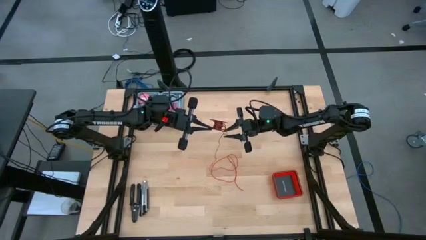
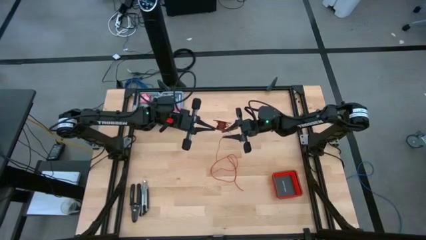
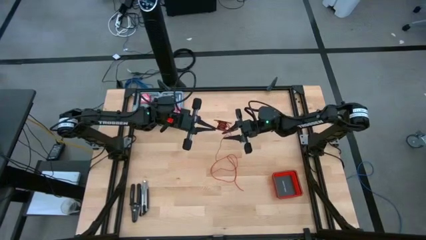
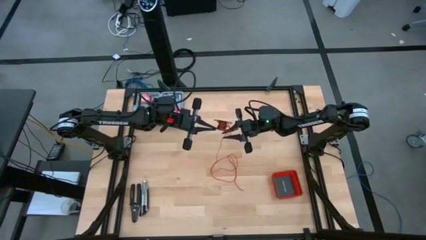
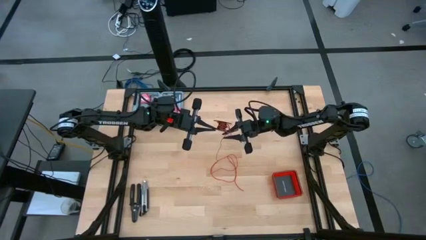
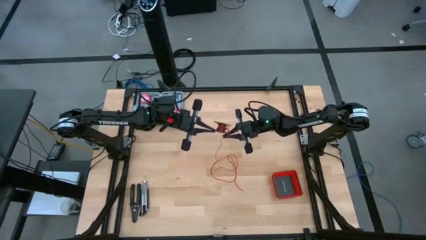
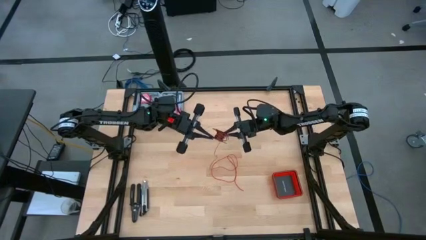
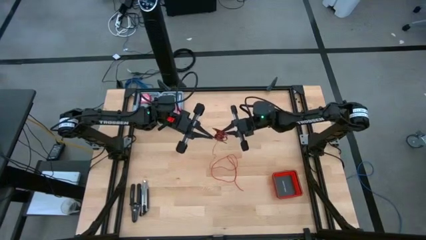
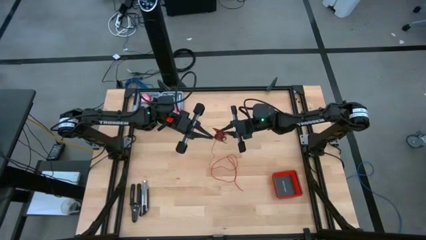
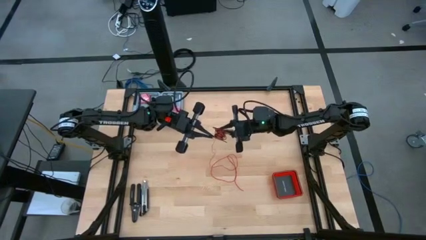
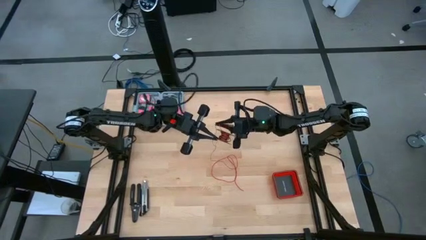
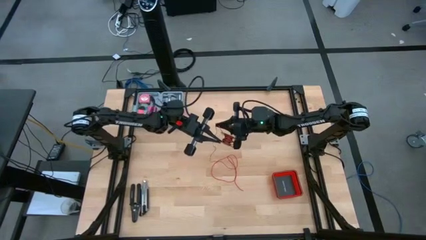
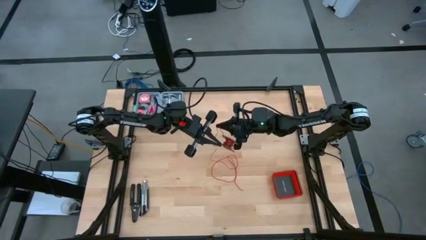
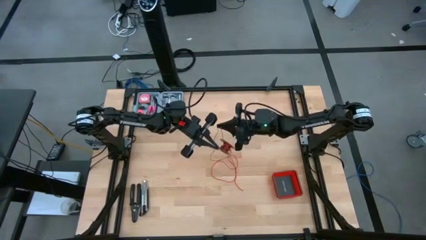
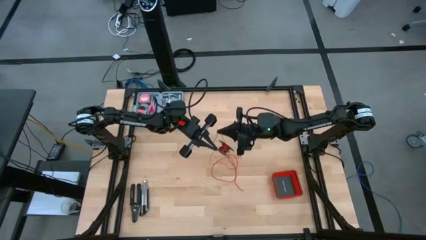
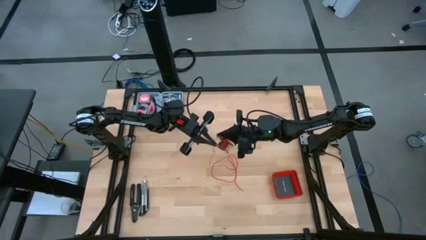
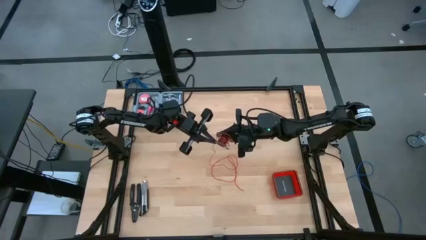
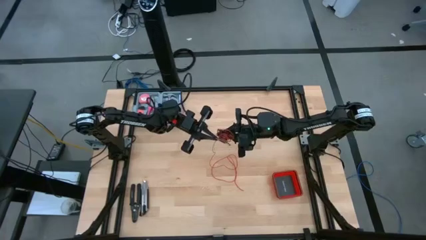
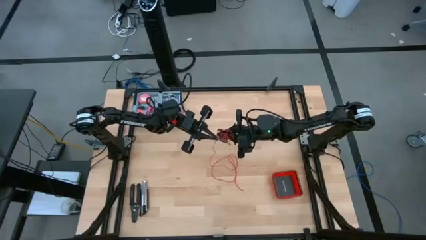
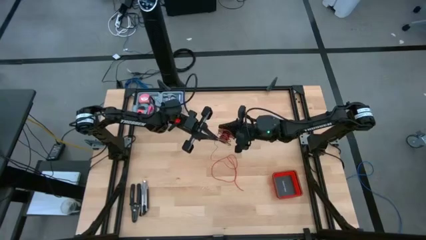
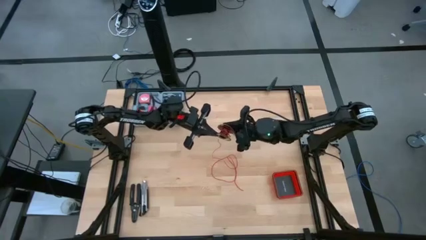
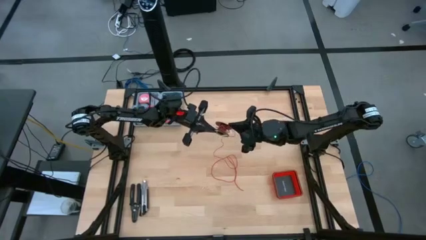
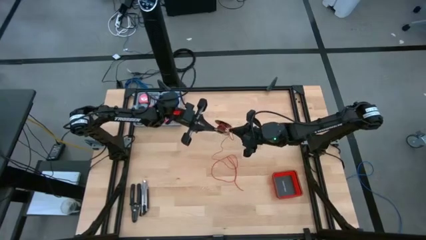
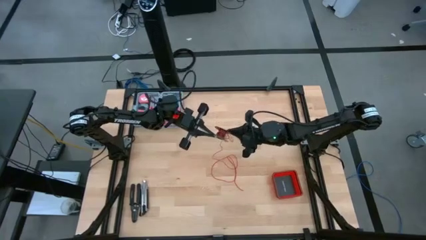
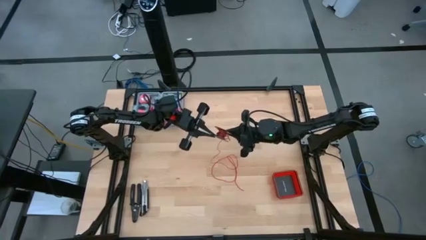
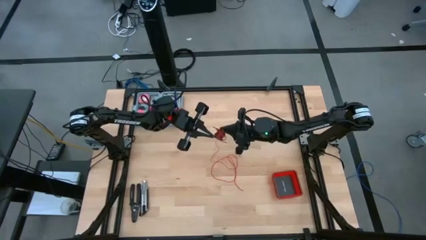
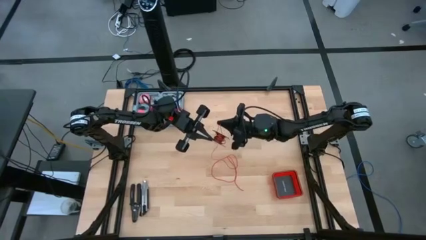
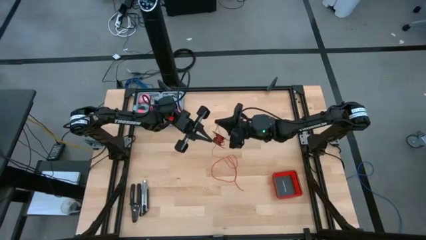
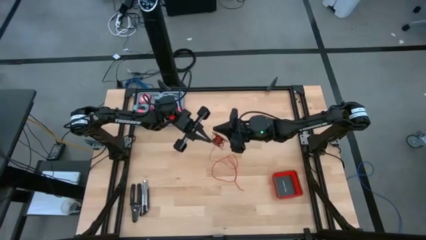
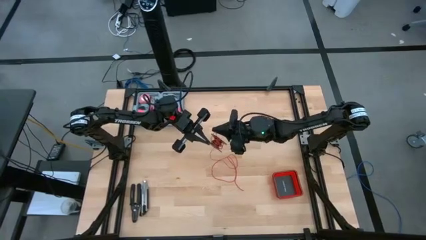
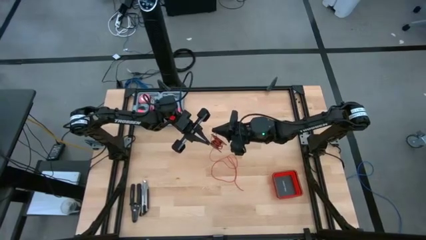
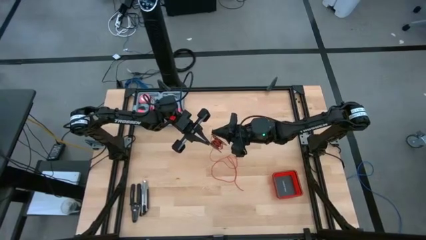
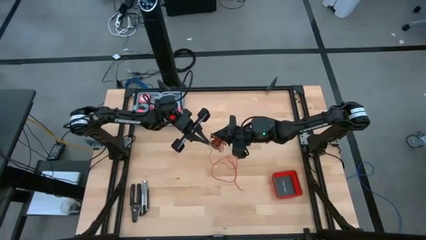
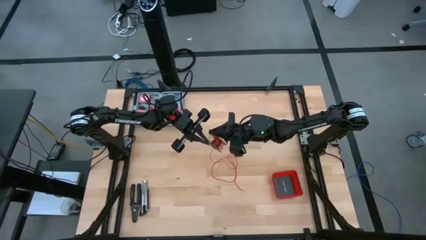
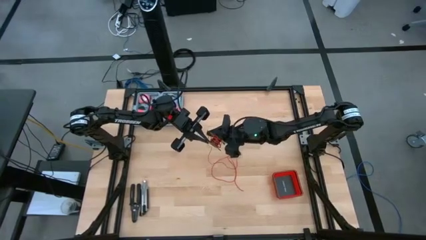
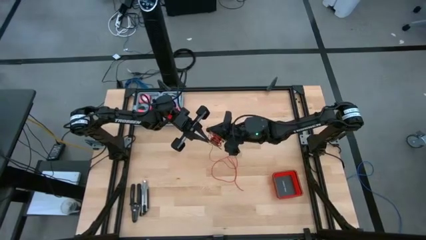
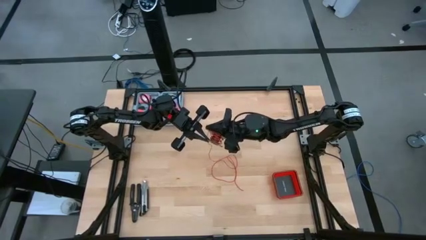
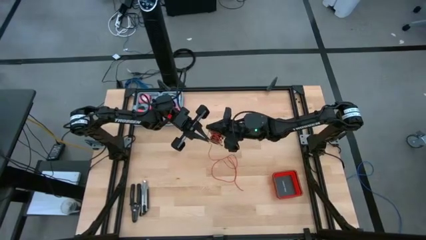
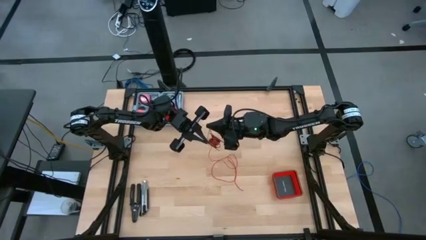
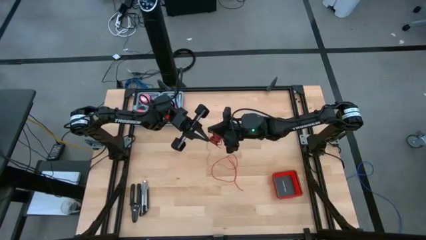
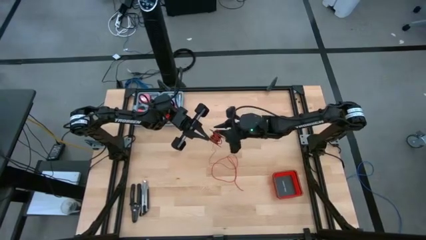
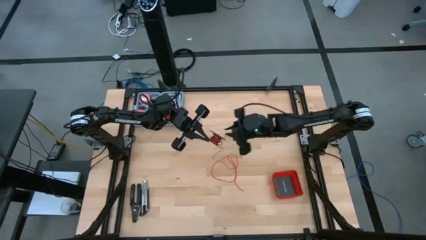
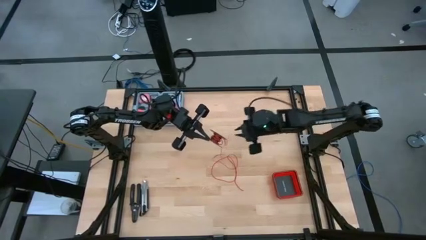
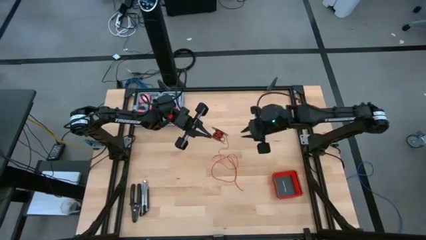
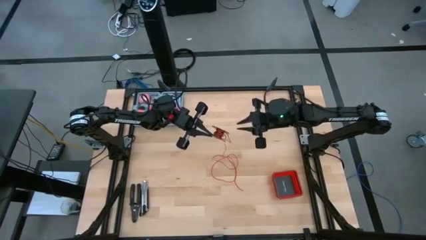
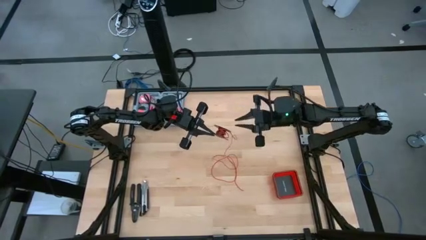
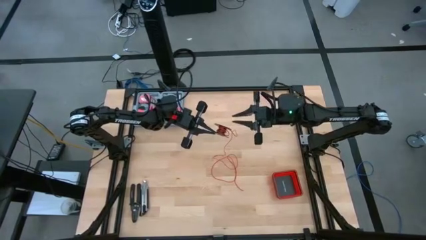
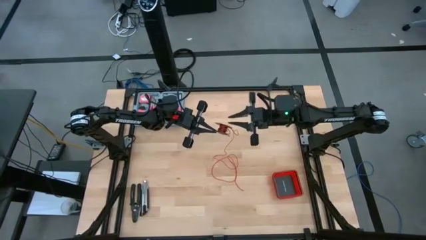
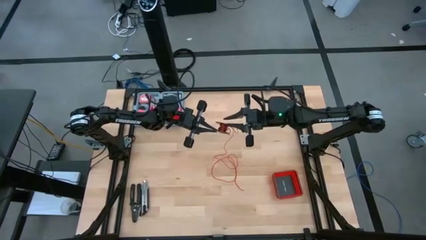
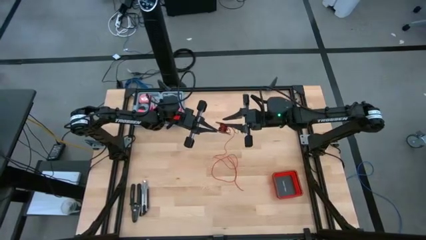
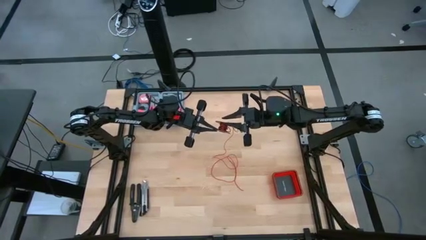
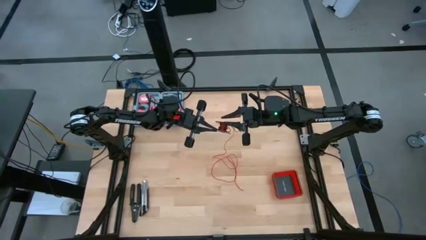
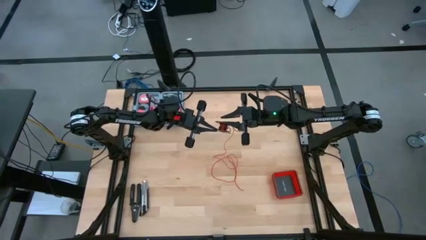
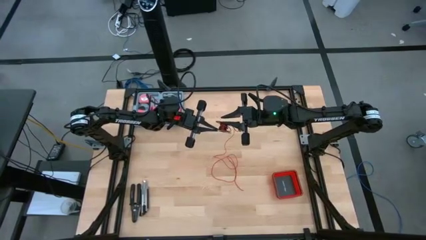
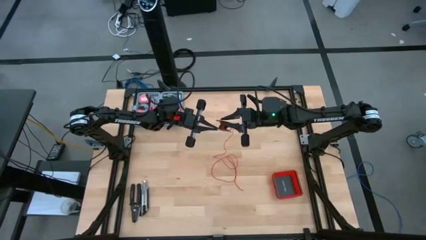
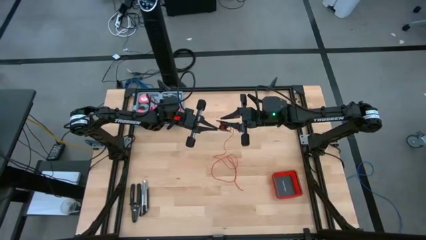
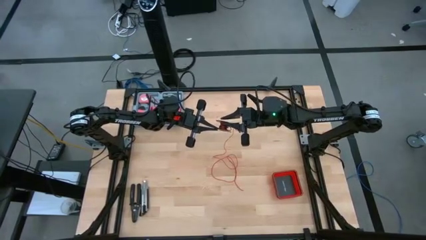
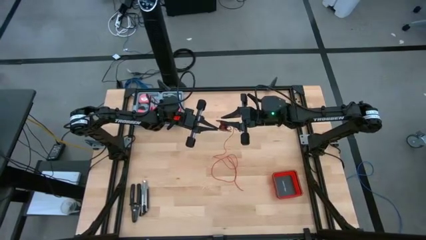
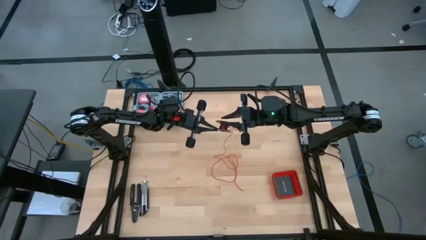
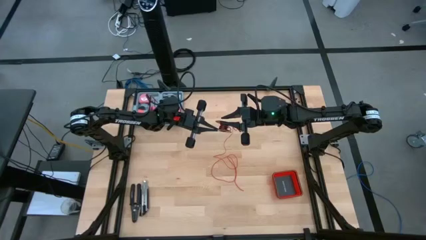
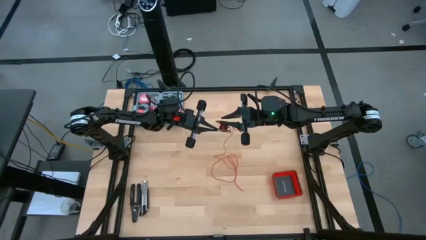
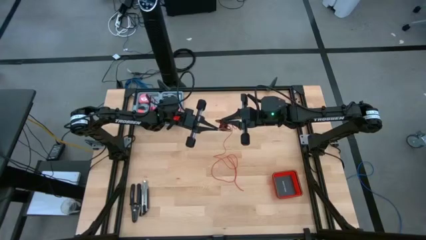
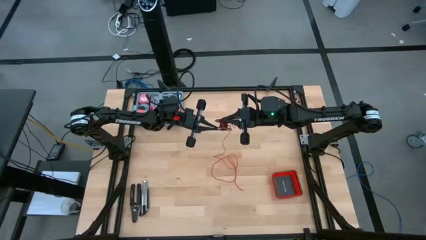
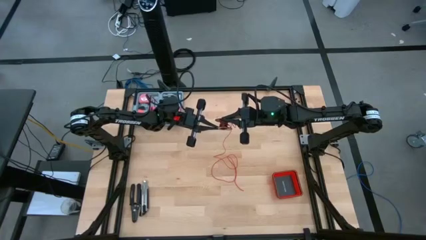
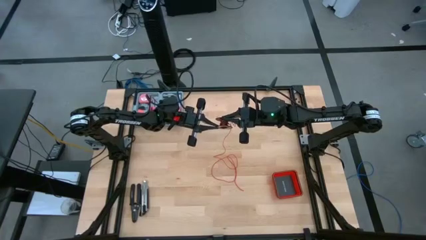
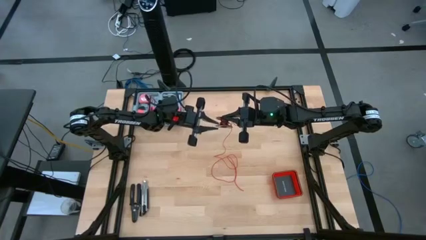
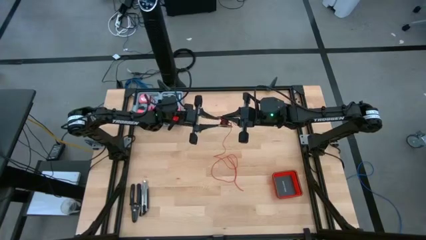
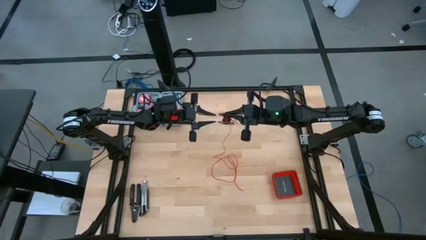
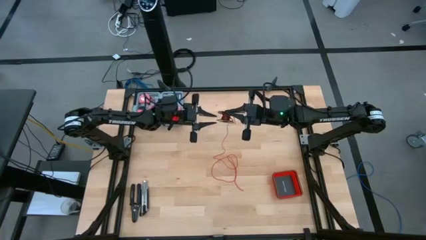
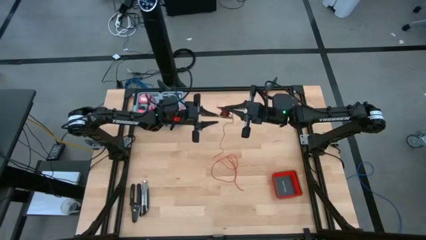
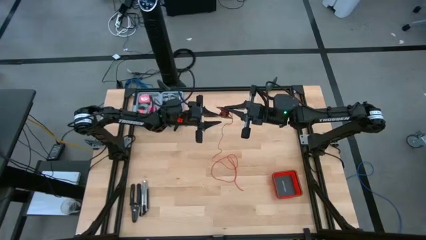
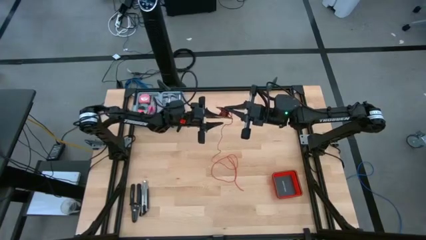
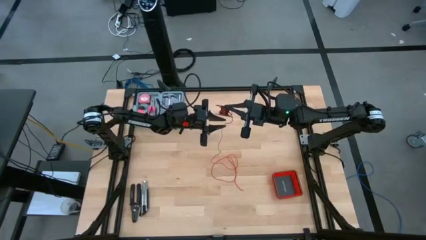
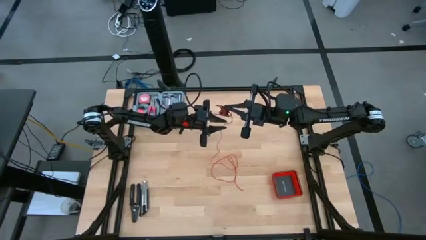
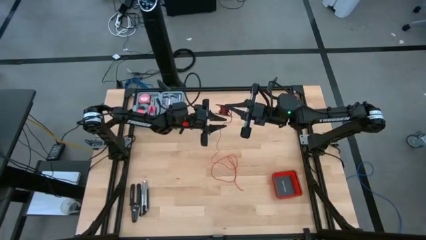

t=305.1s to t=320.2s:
Task: Coil cords
Coil the red wire onto the spool

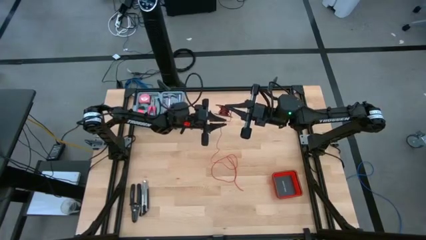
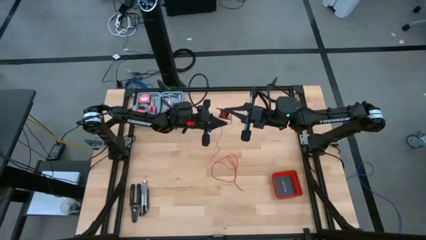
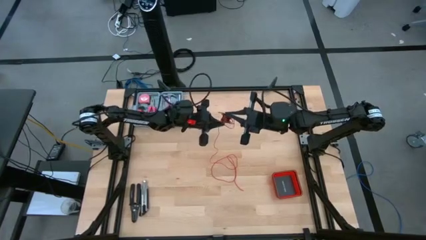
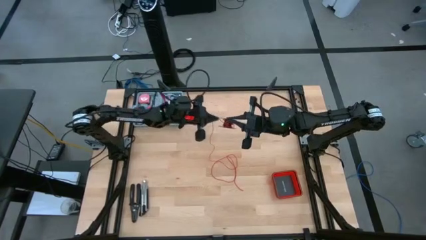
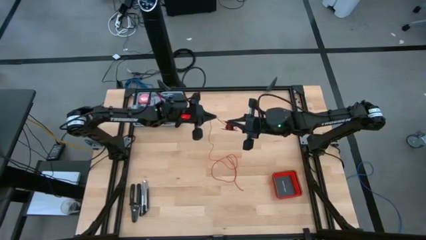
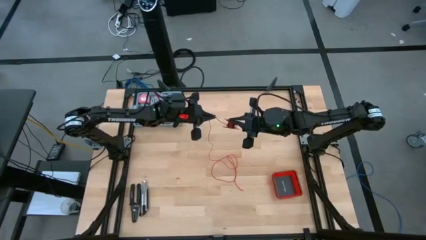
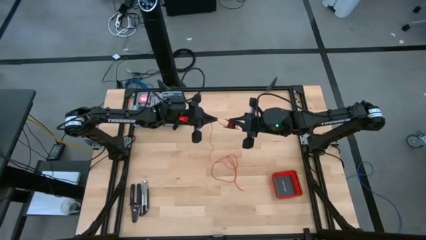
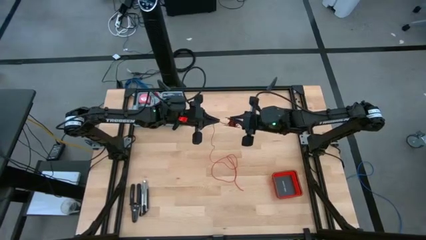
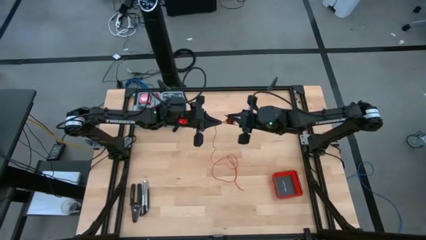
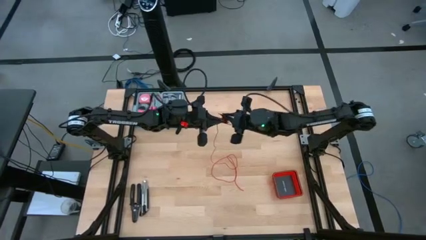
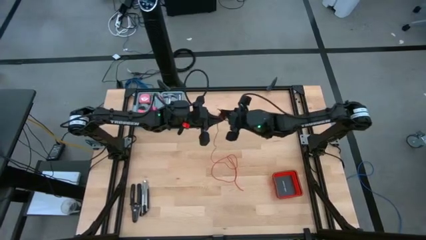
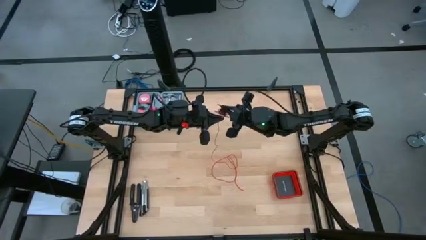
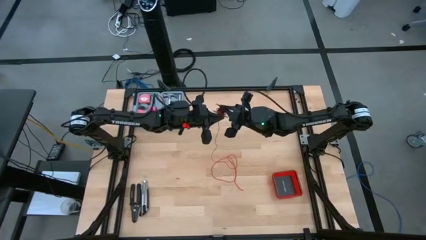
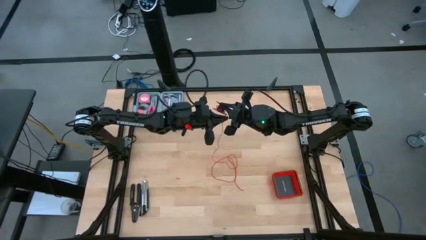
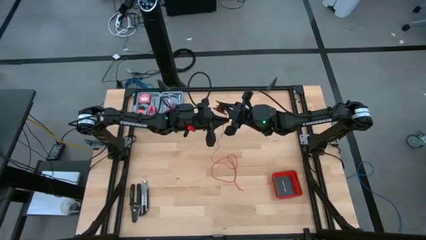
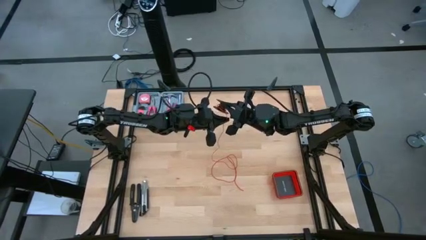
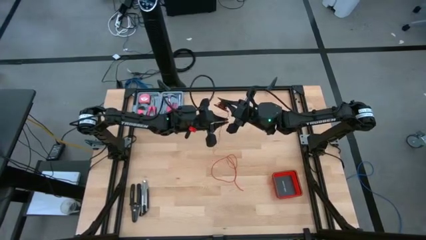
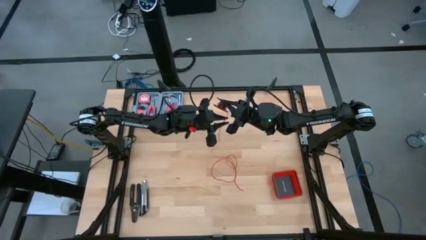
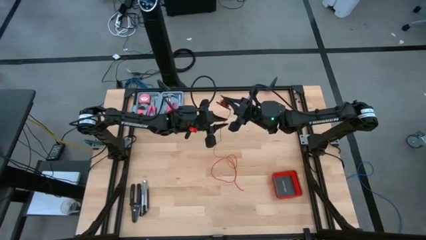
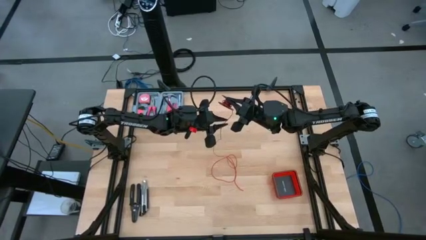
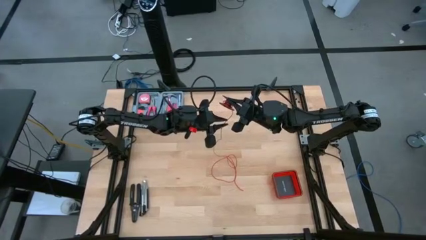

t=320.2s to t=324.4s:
Coil the red wire onto the spool
